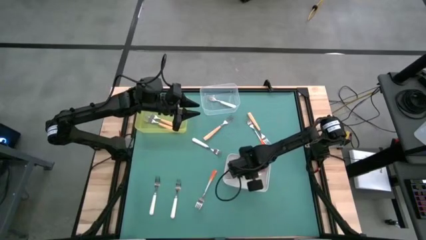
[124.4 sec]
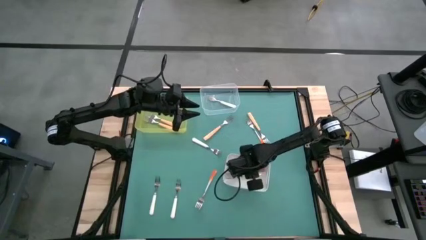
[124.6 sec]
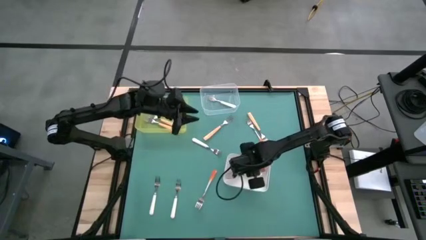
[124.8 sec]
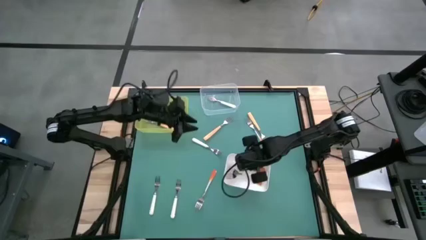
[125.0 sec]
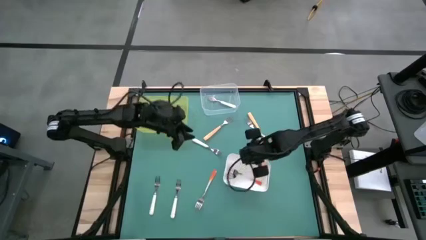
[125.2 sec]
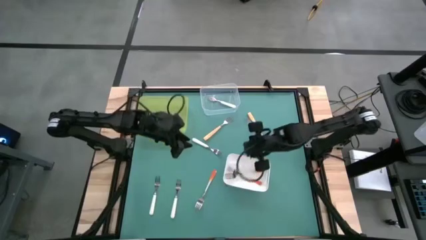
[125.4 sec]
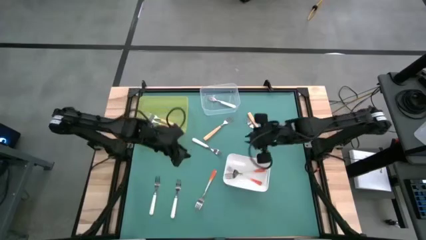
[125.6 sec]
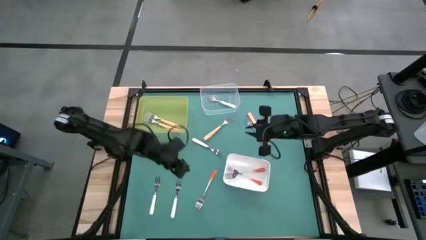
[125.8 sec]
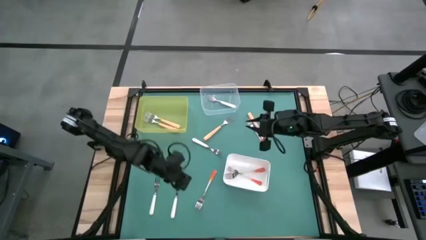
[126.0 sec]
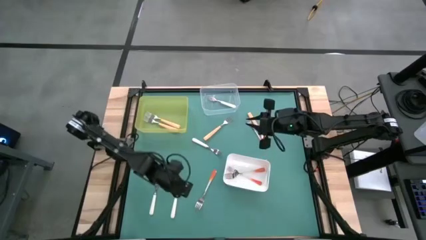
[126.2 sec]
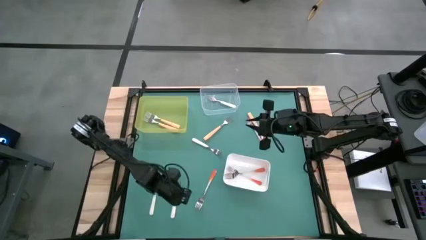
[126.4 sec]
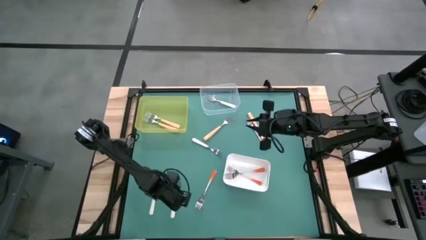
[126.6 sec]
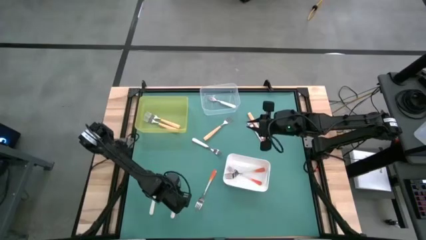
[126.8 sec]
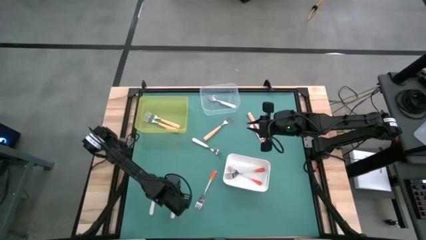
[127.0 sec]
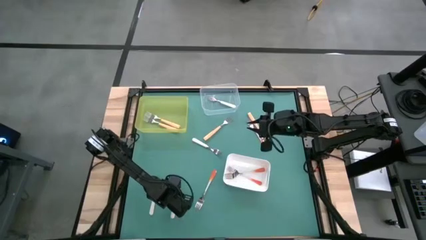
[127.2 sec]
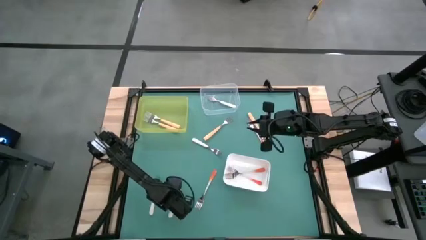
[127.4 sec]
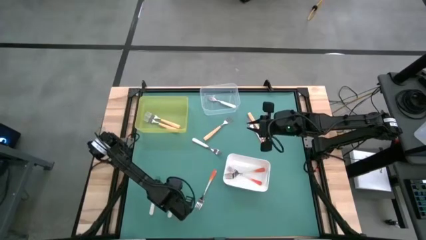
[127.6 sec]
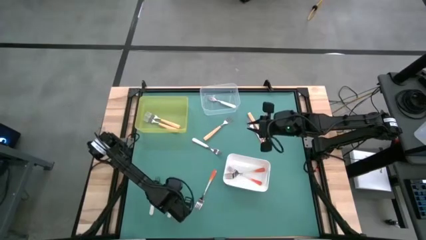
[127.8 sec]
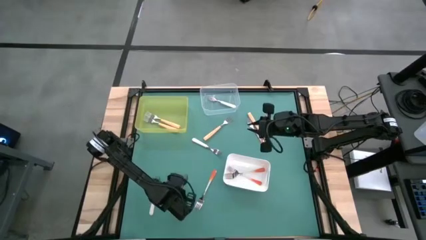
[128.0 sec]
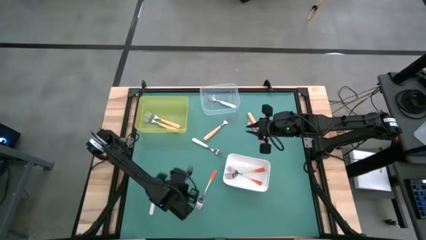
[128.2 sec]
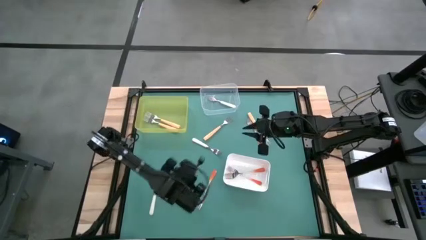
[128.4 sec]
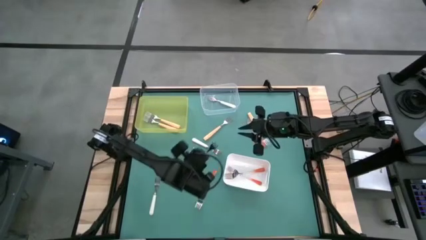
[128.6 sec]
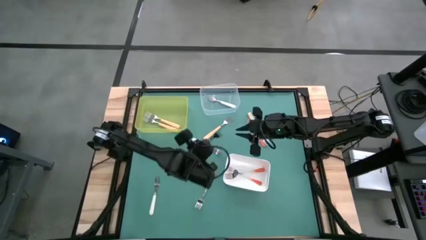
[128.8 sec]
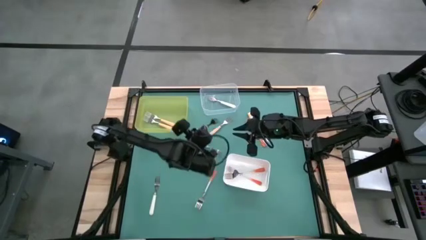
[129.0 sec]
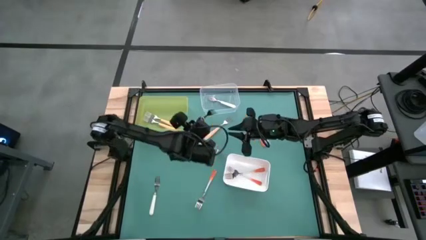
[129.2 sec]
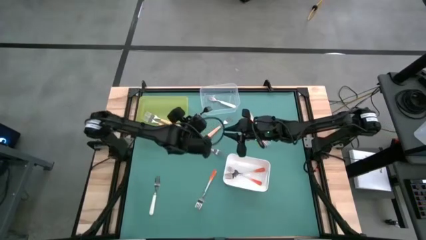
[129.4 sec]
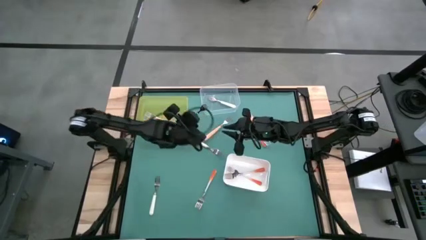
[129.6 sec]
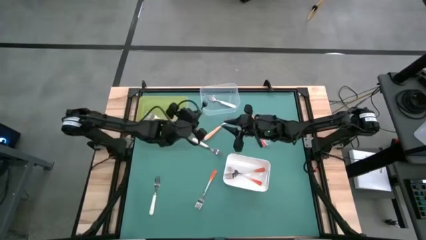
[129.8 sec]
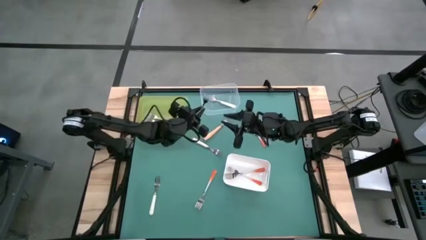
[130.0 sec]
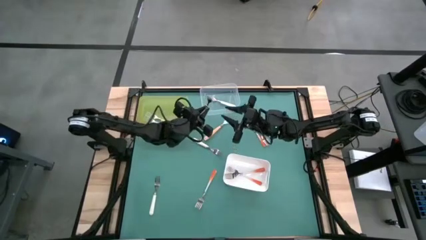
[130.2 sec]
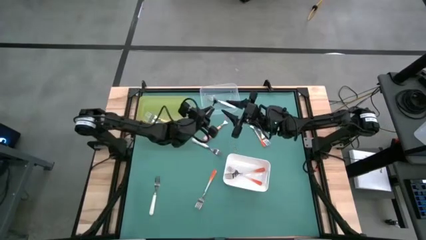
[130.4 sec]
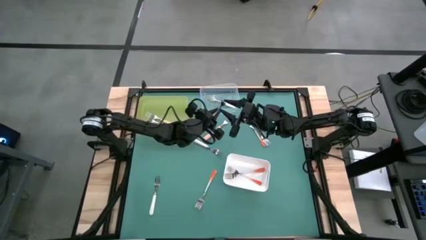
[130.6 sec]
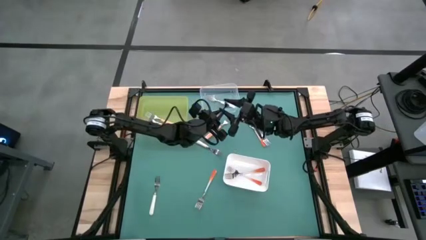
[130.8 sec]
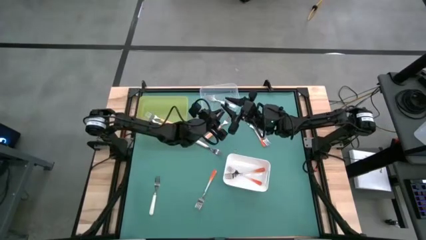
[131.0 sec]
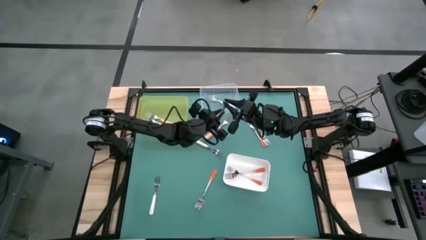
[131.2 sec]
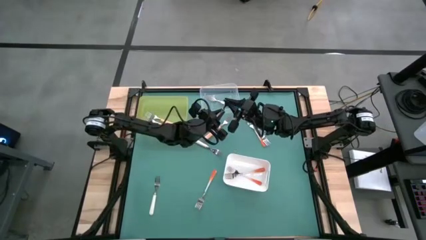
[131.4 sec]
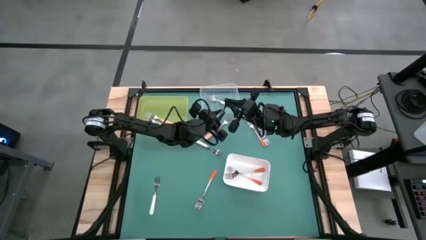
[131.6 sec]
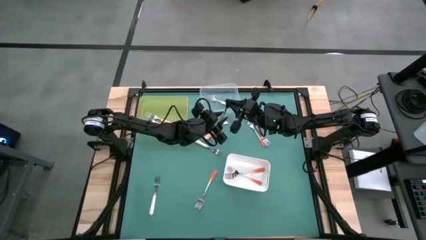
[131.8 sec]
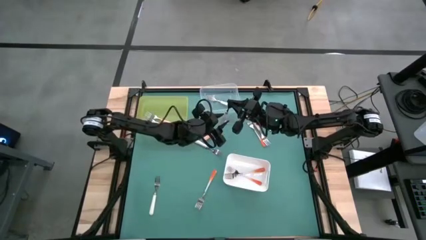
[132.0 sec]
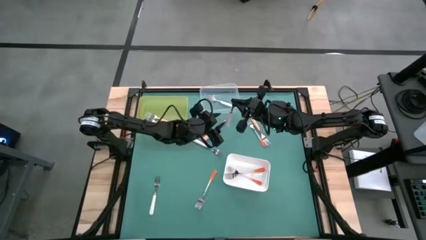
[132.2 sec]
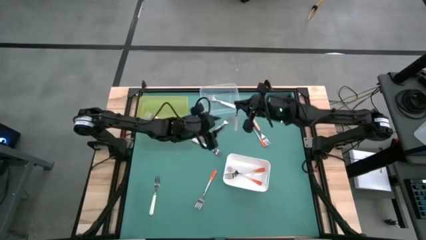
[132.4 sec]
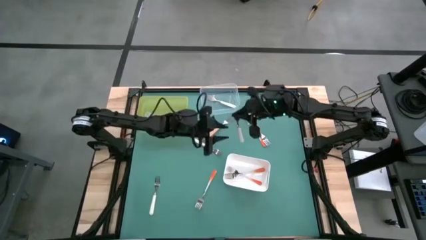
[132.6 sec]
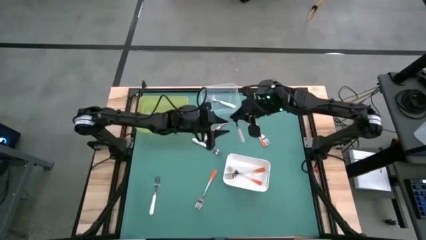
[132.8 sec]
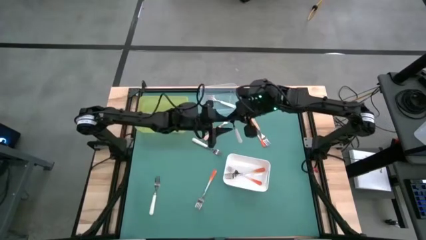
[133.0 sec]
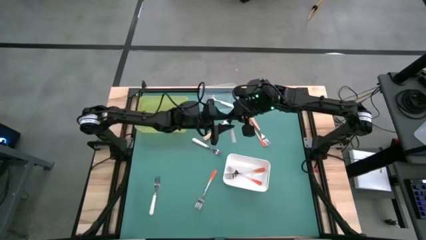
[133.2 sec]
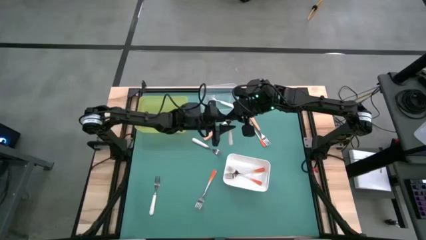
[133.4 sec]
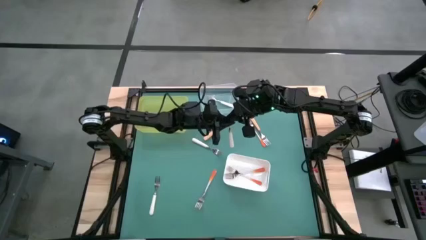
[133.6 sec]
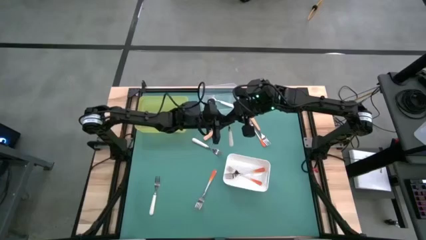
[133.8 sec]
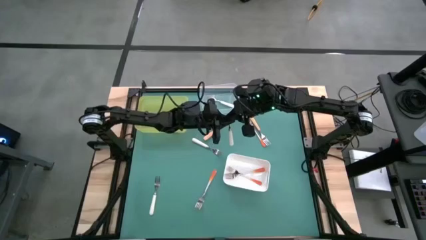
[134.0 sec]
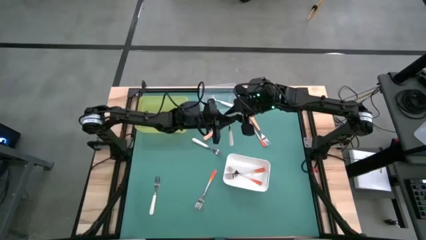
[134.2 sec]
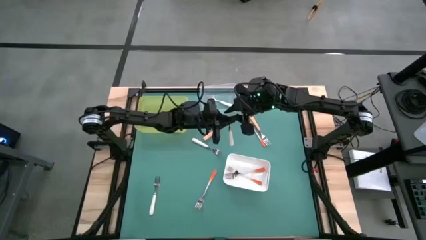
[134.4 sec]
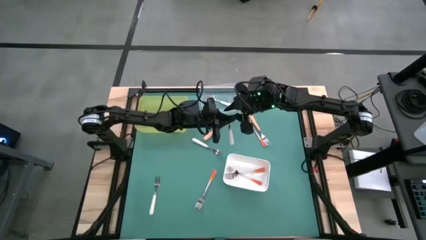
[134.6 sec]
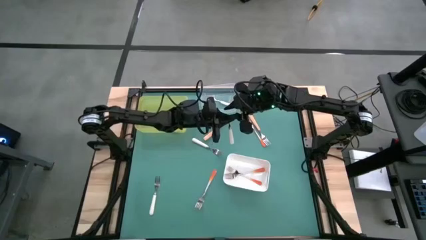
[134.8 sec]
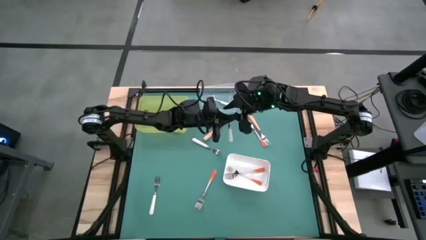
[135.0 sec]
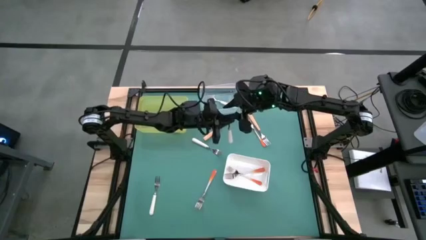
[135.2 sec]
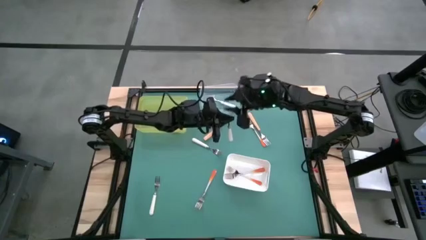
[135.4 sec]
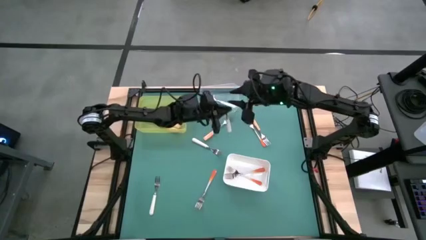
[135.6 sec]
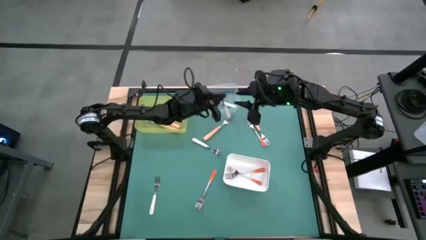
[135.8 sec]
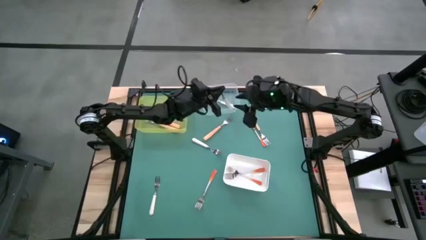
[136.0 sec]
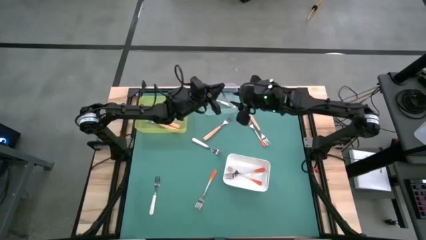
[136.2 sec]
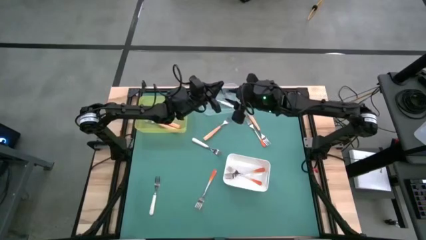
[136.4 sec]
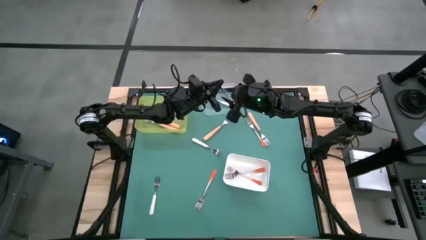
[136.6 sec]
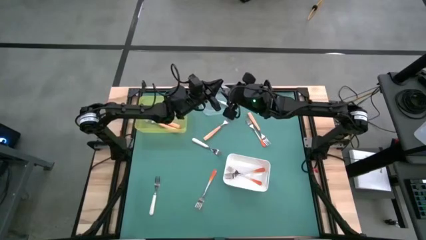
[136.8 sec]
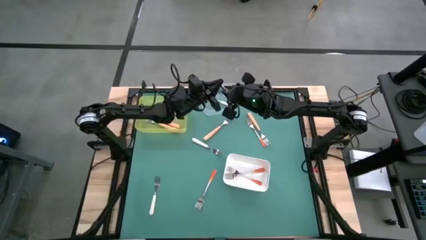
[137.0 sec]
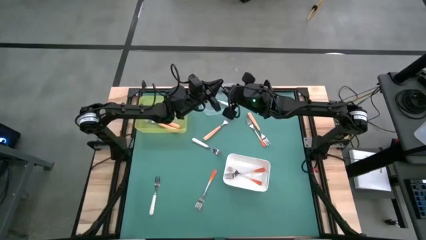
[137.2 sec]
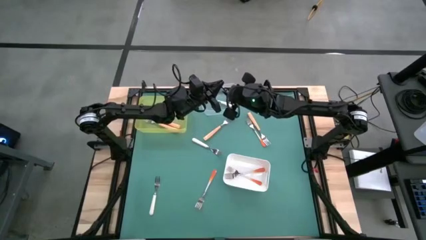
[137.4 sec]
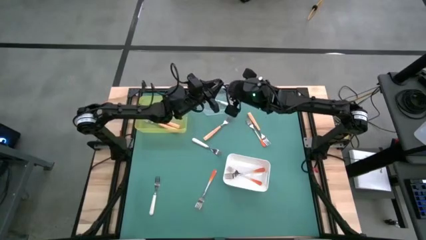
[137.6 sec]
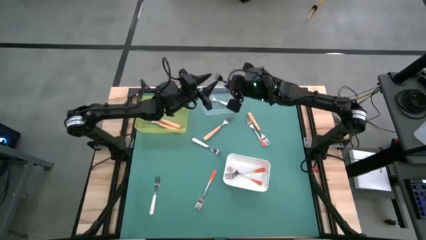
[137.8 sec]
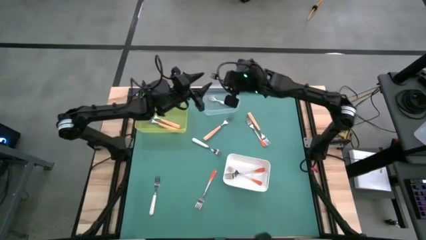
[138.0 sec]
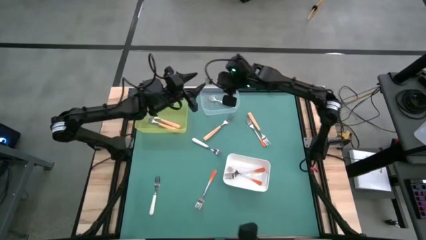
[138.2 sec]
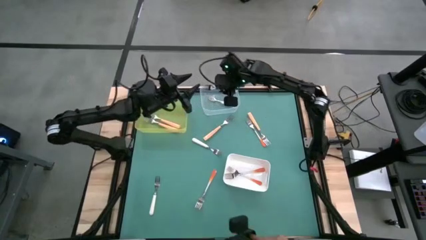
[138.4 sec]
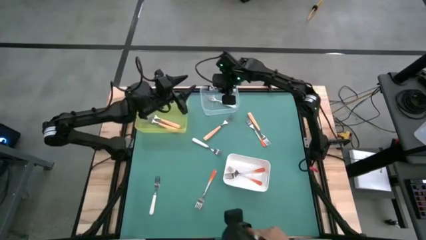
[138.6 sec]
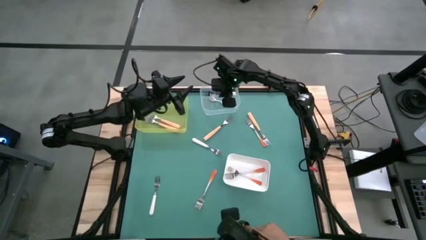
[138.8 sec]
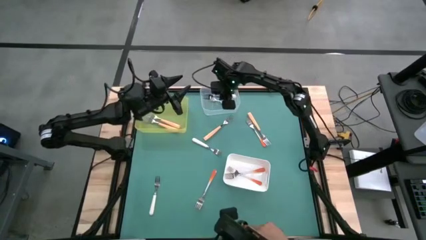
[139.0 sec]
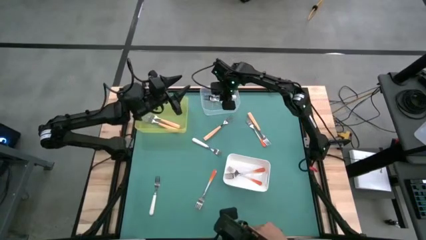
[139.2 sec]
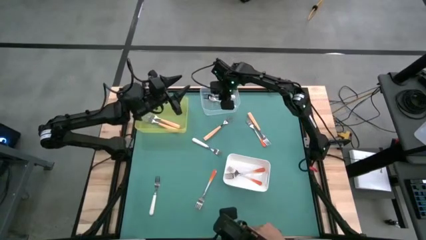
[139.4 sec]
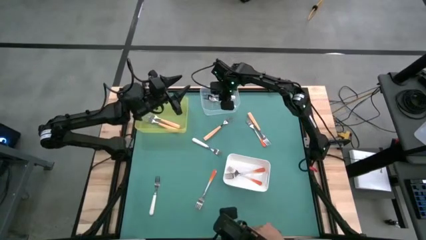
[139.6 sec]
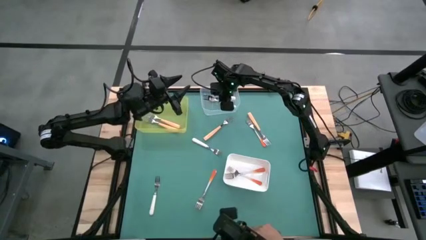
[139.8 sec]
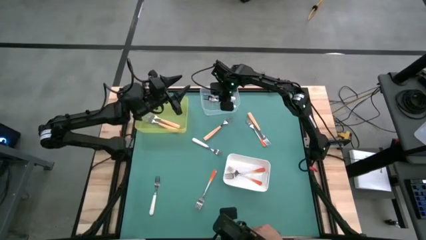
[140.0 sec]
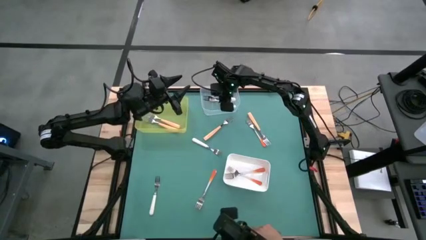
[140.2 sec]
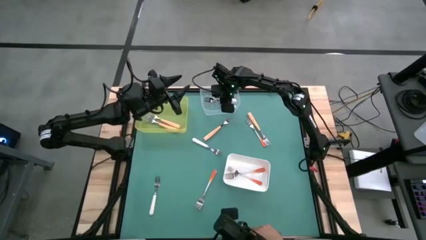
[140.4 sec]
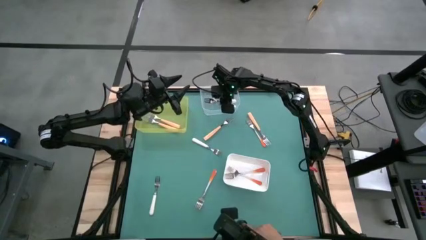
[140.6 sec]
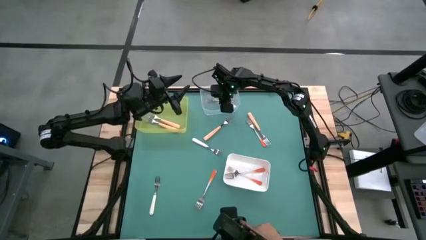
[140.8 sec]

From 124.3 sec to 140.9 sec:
Task: Sort silverware by color (type)
Put the white fork into the transparent bin
